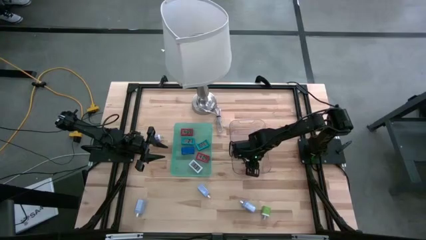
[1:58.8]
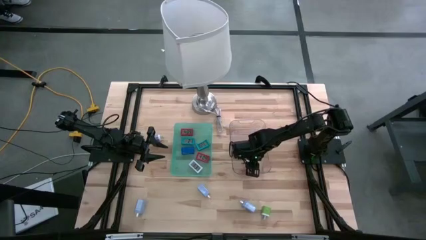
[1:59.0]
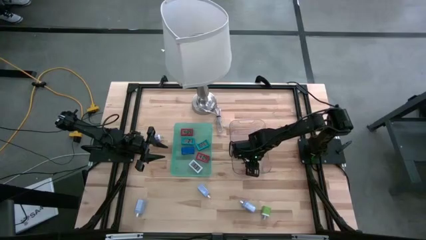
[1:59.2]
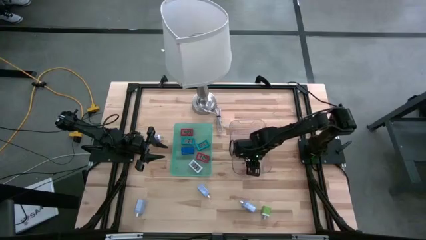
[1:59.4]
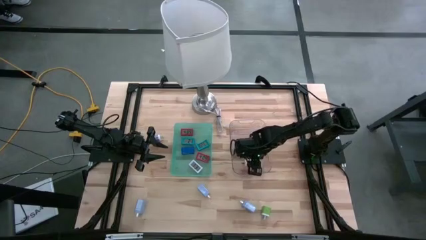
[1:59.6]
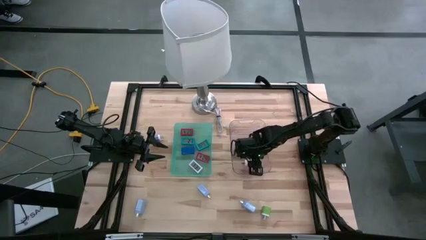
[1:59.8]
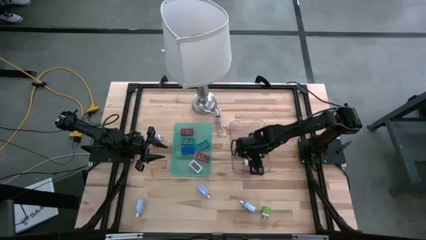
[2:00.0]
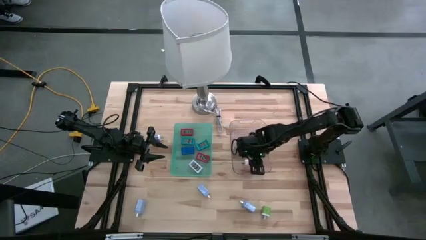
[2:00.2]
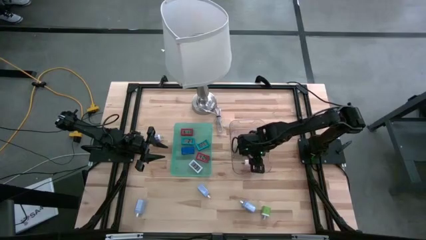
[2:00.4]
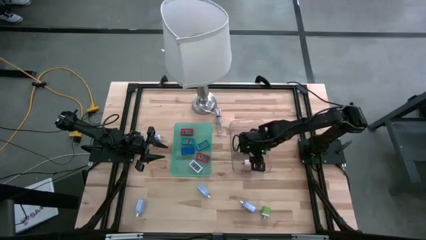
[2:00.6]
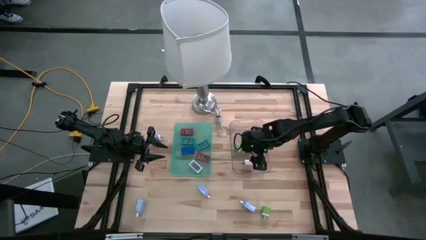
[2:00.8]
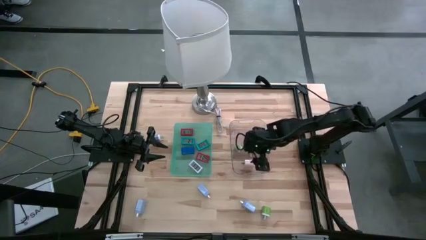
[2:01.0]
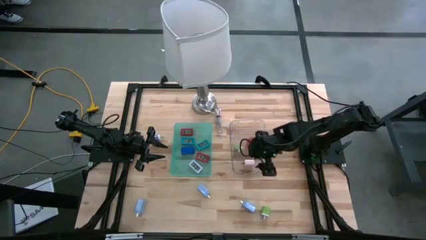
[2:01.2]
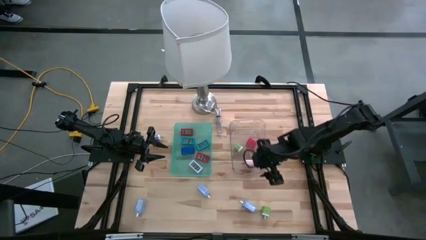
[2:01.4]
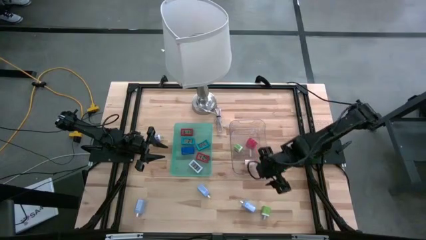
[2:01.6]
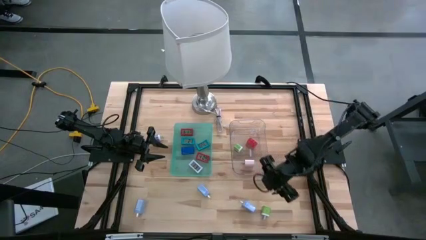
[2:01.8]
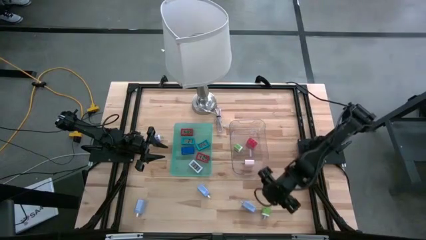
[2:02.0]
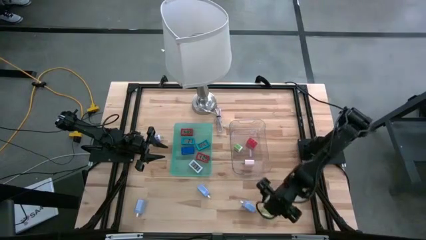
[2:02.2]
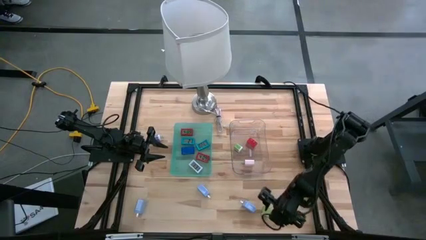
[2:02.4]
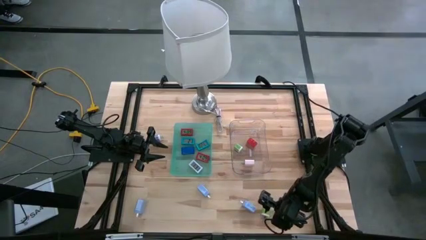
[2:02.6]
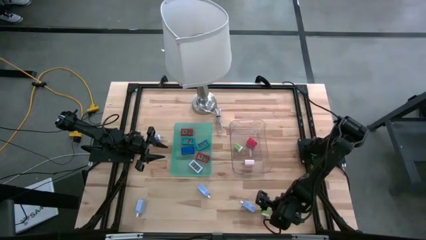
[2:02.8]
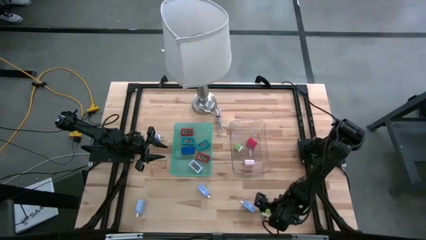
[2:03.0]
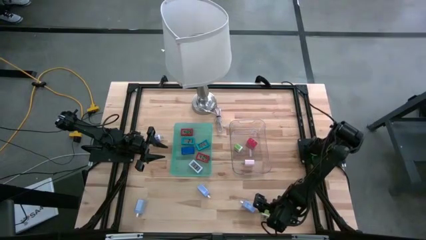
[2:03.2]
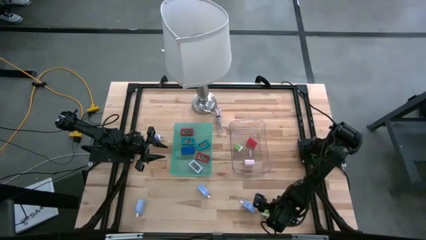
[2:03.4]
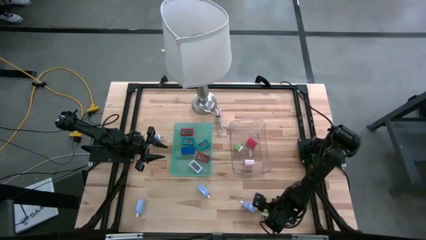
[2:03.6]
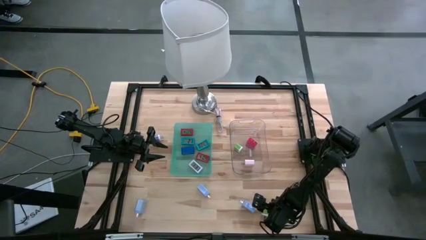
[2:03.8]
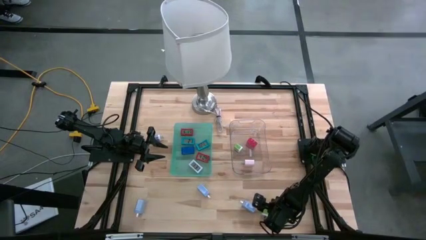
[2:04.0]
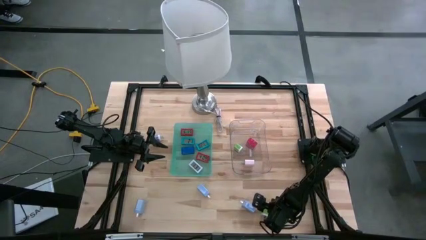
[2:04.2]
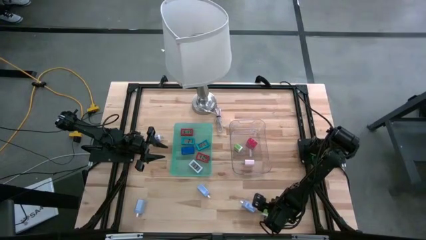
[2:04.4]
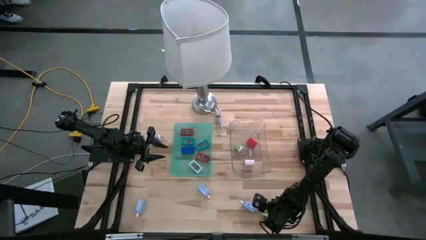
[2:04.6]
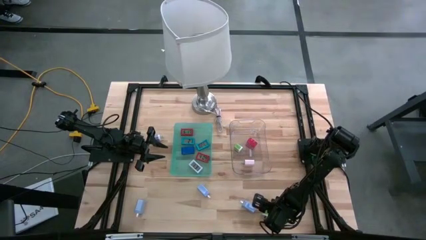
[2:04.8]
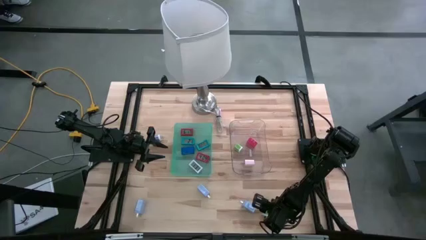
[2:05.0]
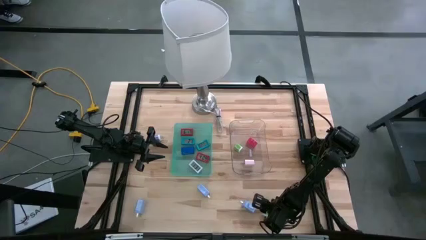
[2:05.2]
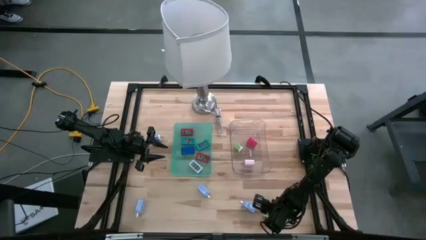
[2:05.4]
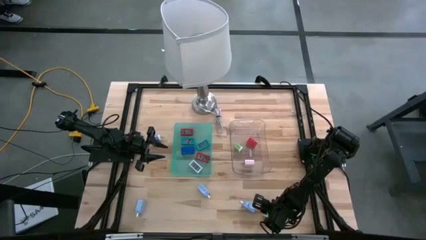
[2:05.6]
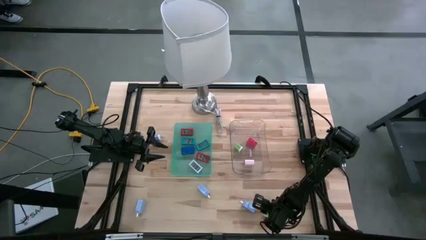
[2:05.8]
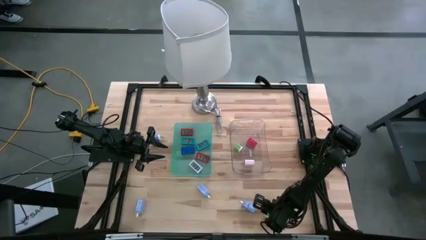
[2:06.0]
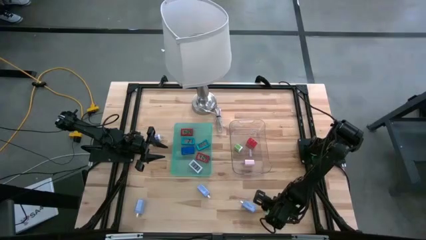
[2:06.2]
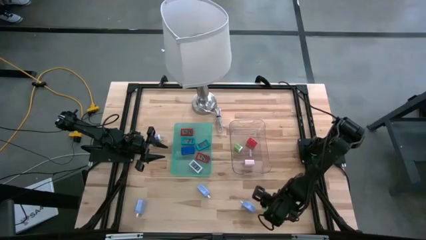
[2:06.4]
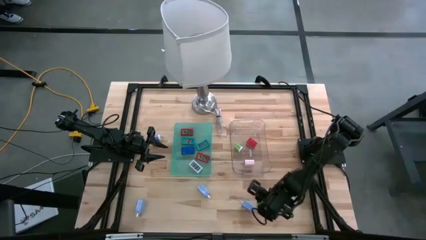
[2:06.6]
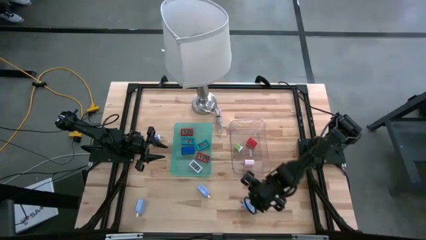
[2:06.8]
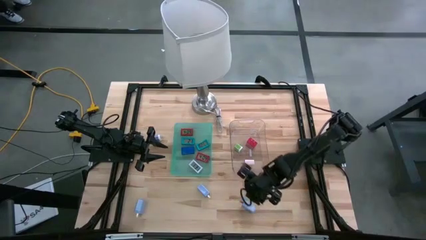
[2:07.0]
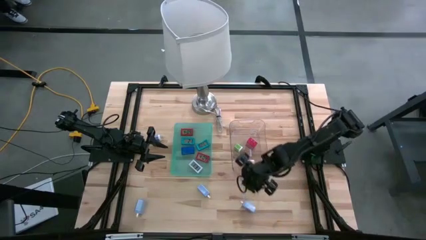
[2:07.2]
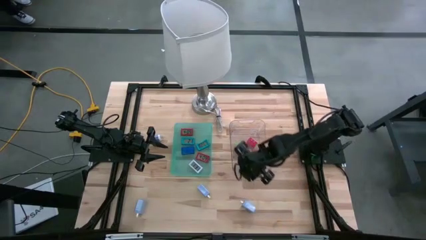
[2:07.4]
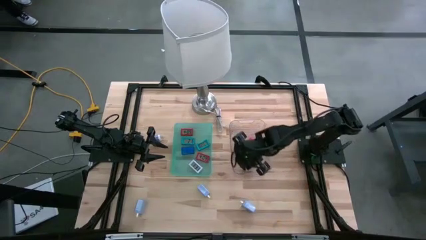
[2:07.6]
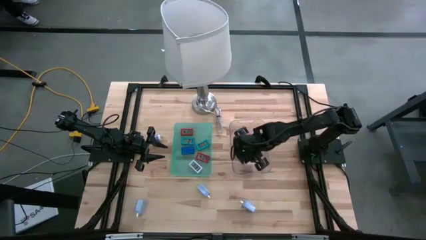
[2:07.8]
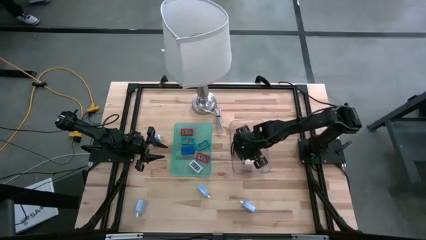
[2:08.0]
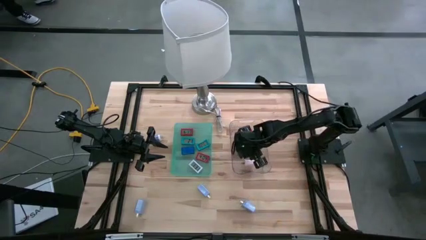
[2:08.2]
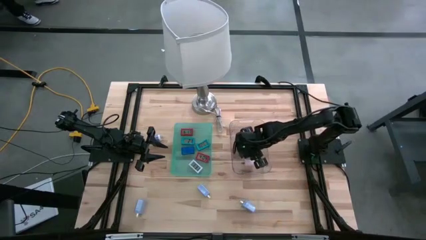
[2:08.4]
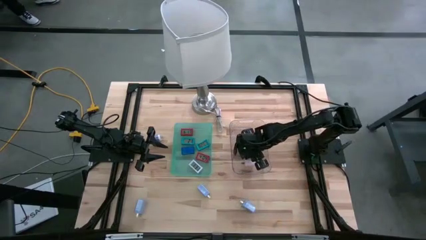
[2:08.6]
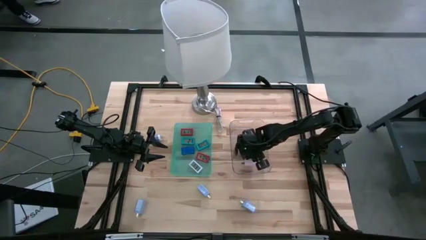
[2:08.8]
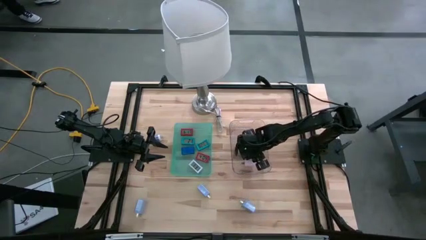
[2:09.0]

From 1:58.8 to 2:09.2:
Task: Pick & Place Office items
Put the green charger adapter into the transparent bin

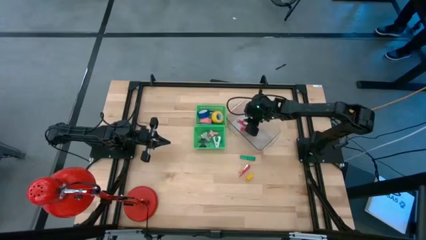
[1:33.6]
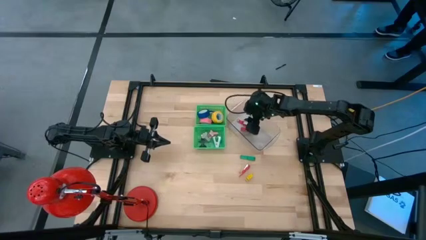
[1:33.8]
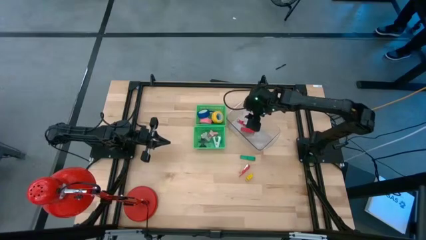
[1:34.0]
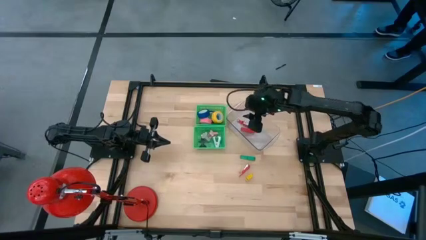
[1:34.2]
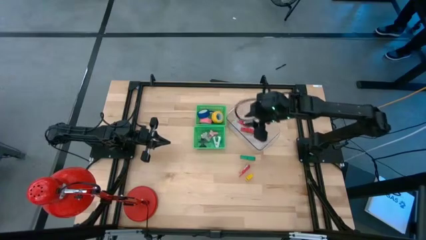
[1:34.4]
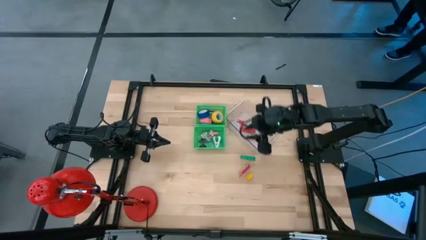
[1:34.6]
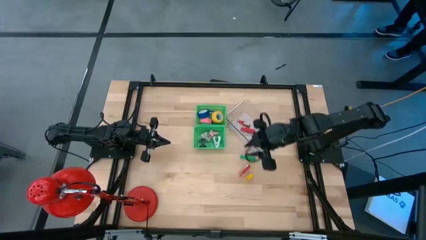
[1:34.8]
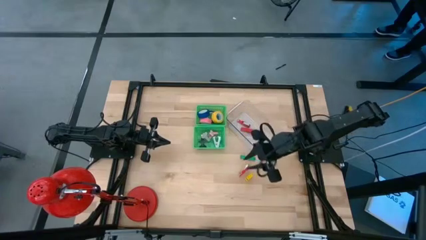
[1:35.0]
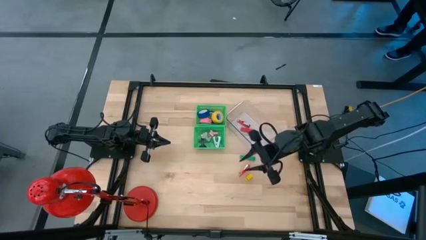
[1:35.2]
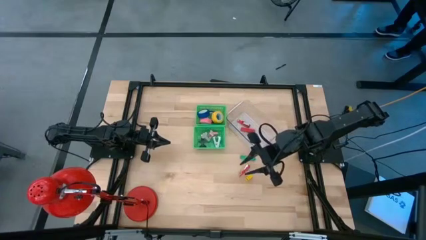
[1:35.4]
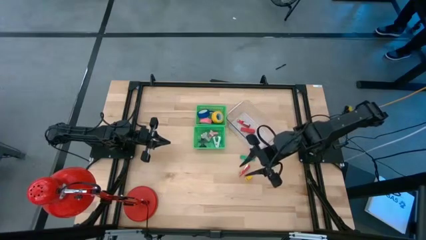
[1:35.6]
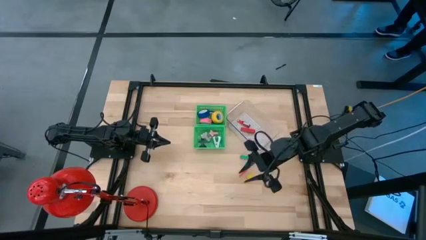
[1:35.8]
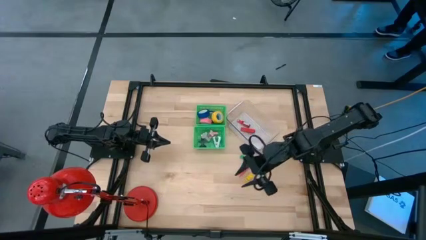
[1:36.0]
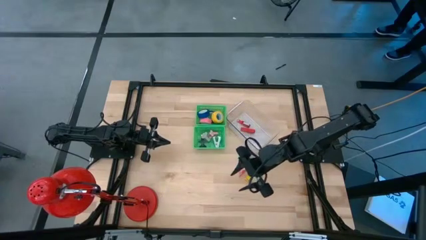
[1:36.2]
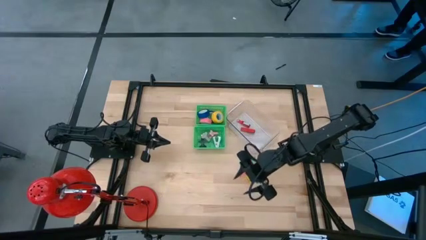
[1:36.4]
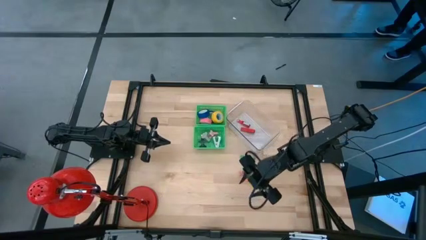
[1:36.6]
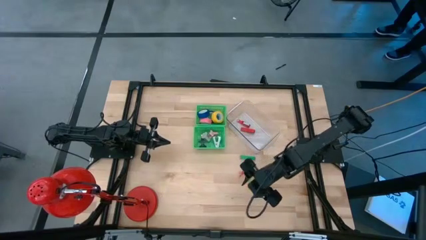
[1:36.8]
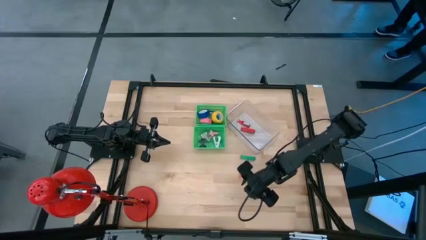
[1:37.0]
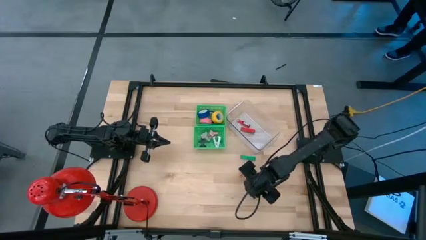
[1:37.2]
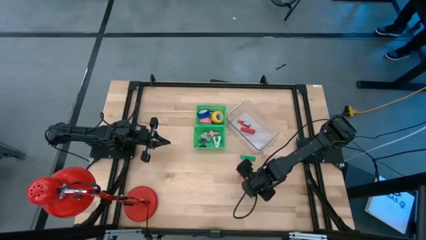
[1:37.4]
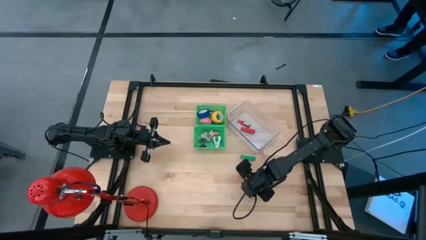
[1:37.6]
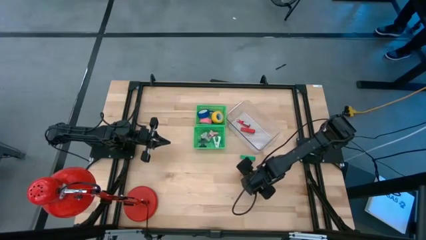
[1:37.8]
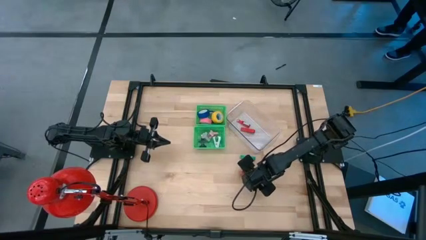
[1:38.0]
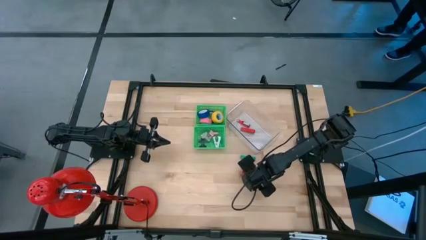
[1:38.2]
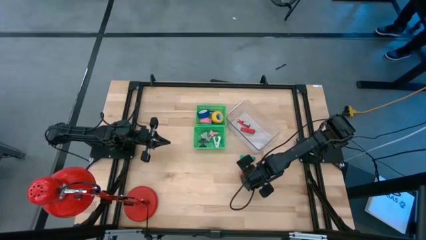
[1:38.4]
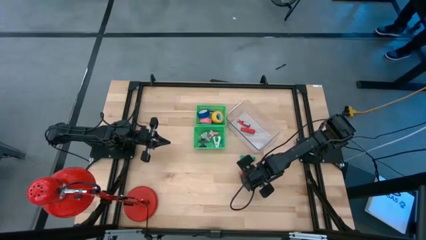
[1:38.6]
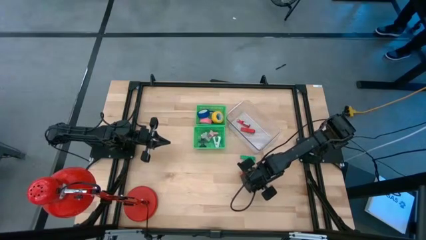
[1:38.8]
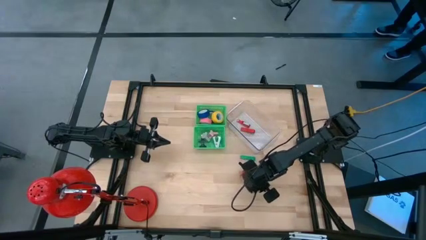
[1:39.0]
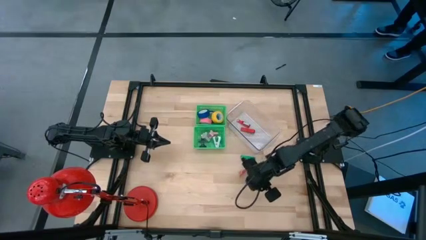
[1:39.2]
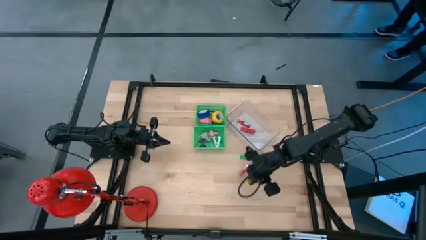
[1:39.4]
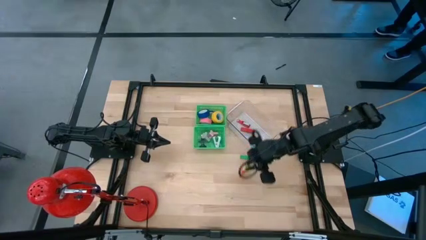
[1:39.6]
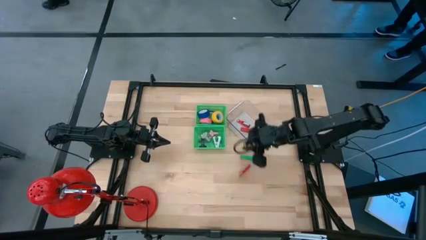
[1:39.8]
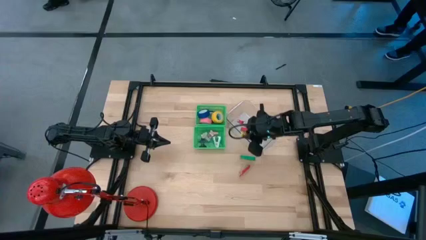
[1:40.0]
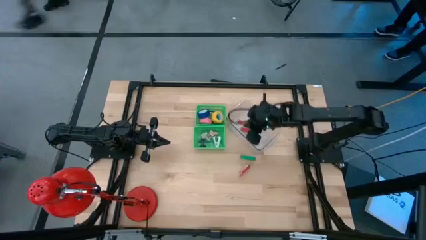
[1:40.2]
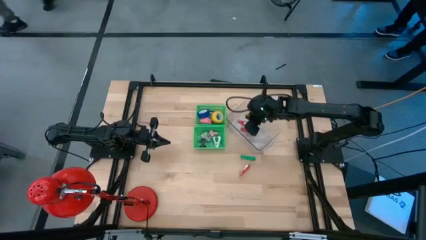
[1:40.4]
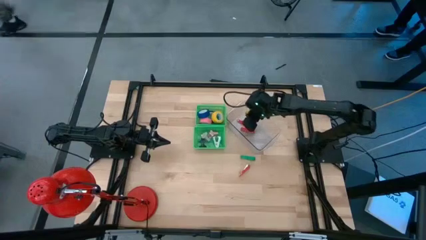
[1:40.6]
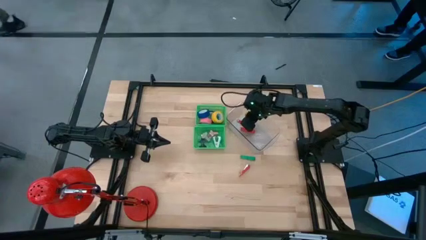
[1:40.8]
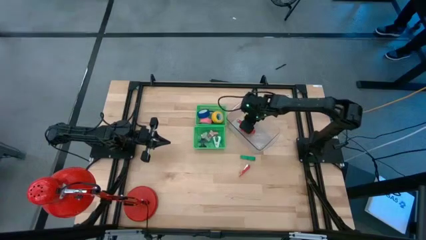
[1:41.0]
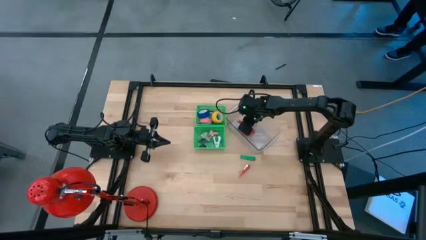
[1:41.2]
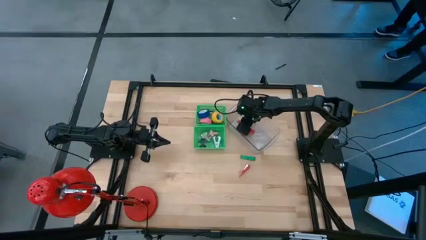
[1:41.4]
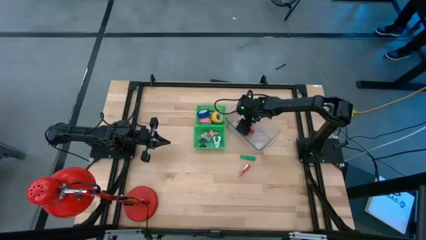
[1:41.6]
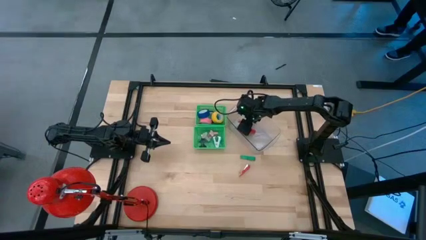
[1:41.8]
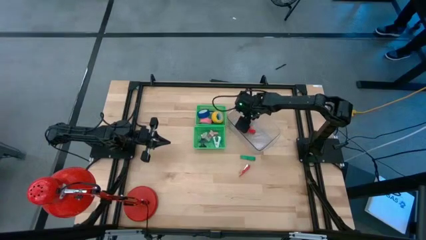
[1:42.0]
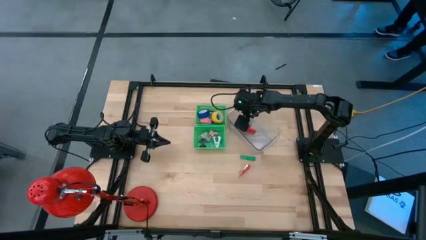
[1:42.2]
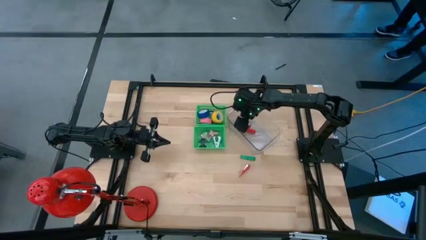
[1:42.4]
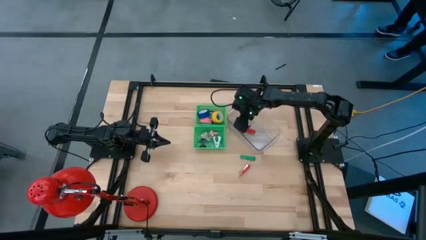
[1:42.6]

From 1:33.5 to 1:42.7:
Task: Pick and place Stapler, Stapler remover, tape
Put the yellow stapler into the transparent bin
